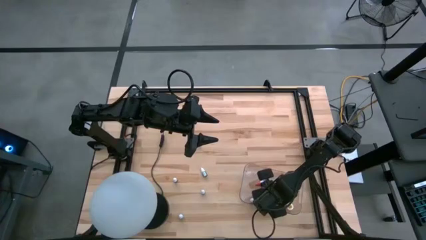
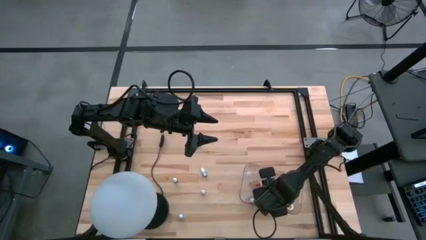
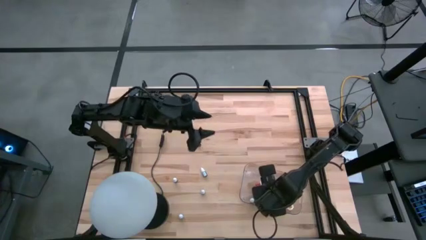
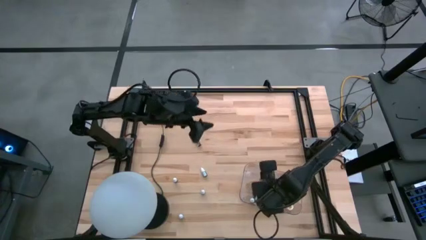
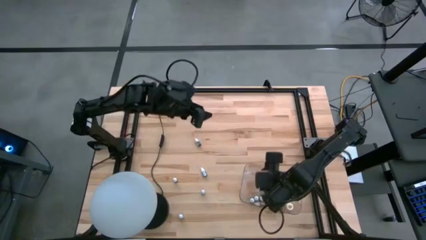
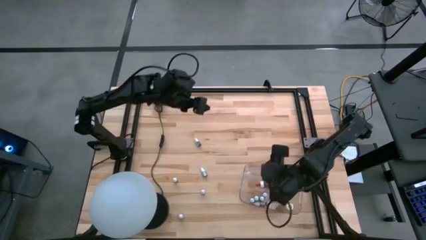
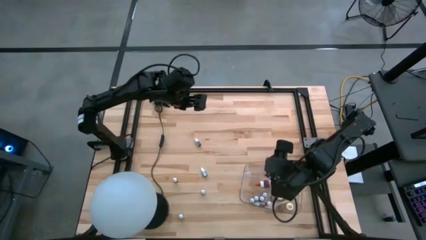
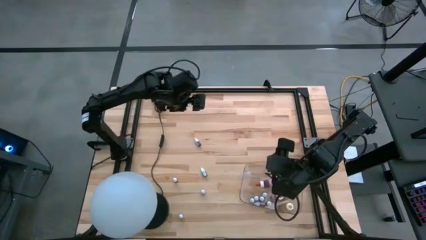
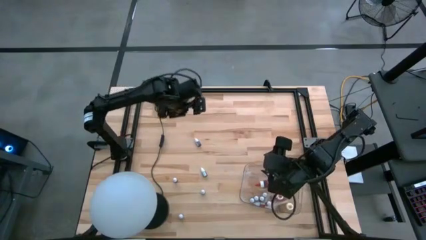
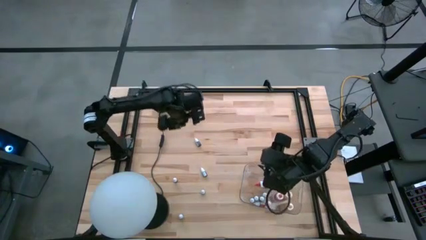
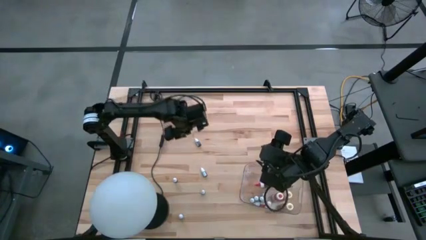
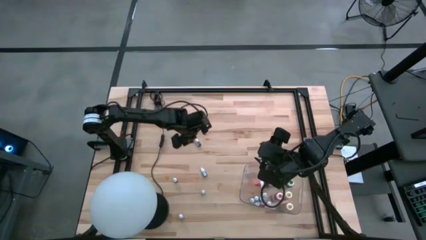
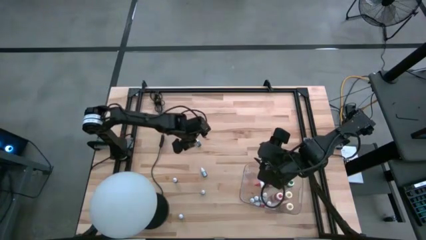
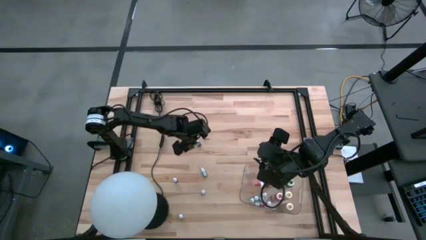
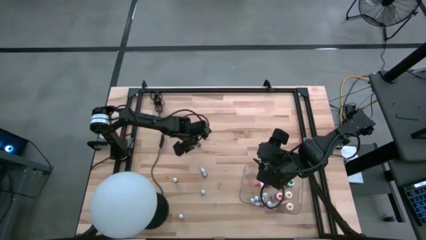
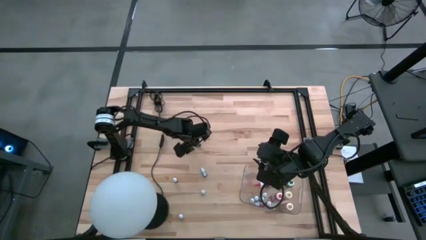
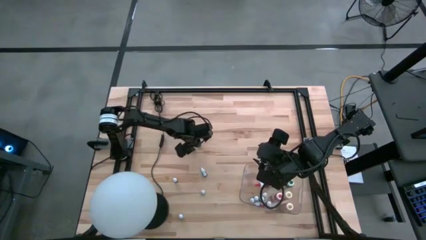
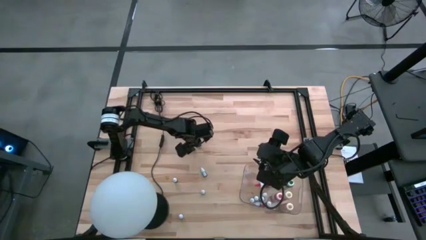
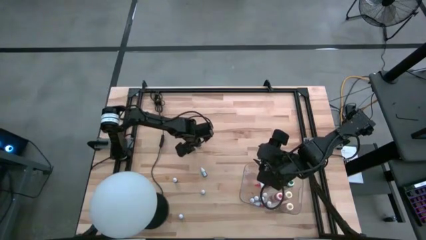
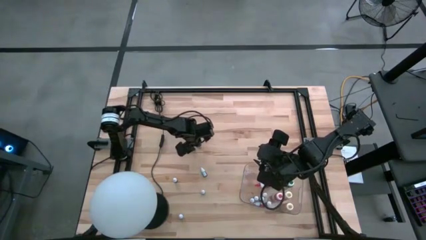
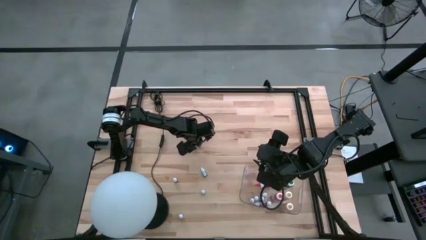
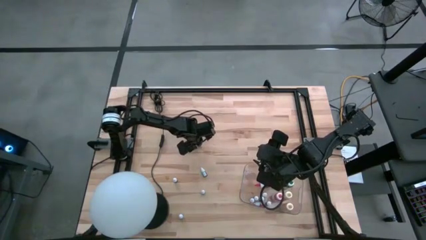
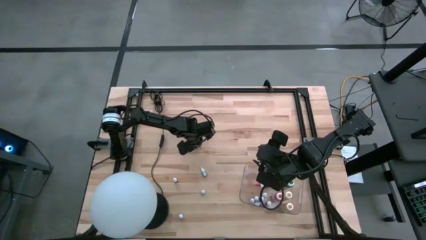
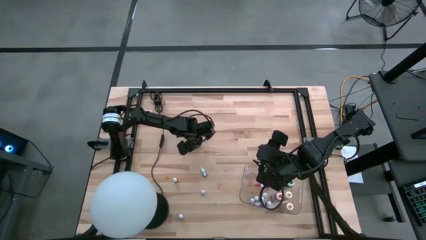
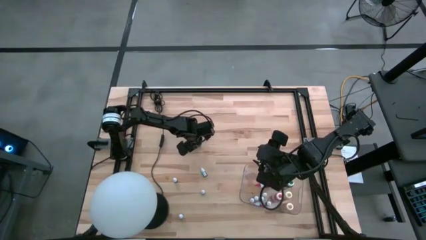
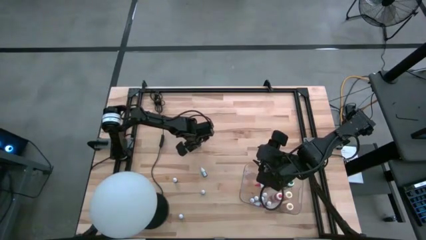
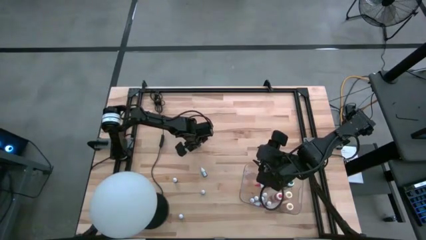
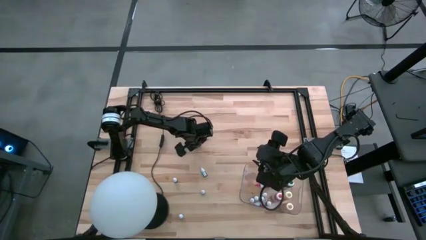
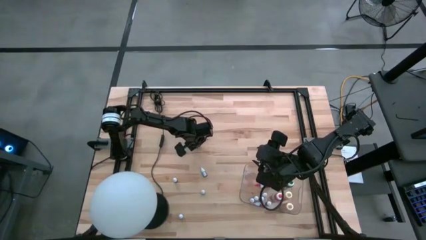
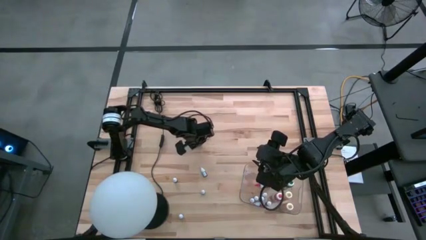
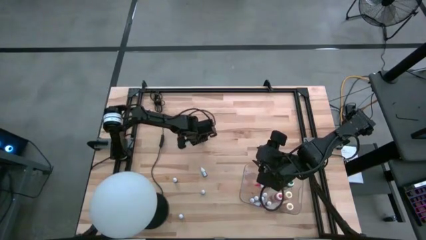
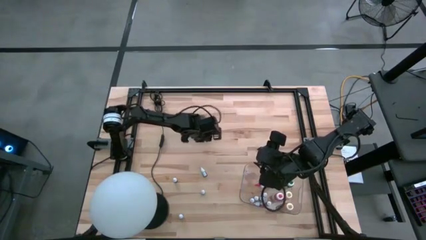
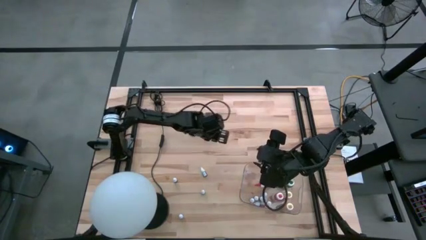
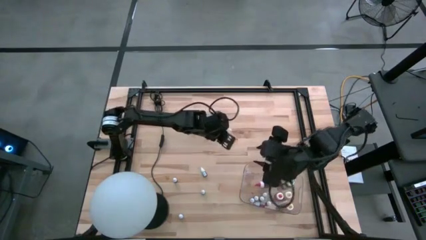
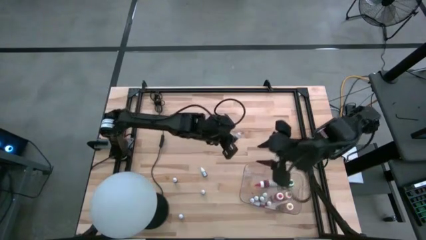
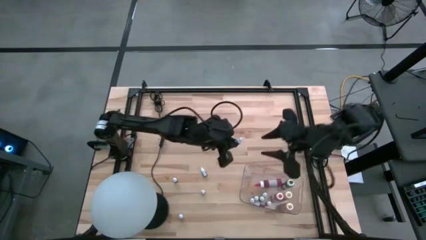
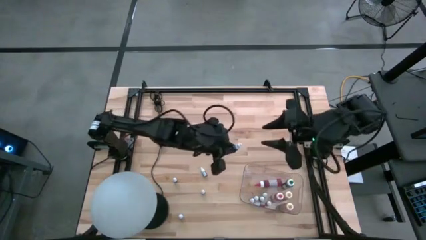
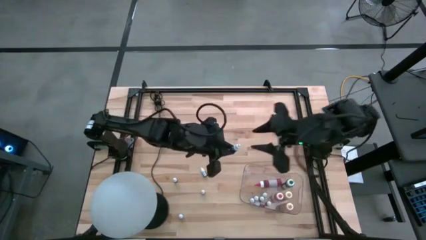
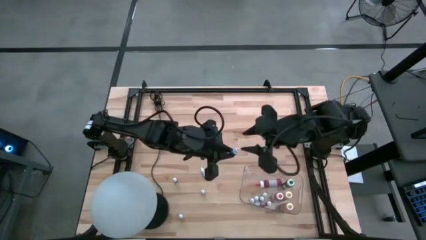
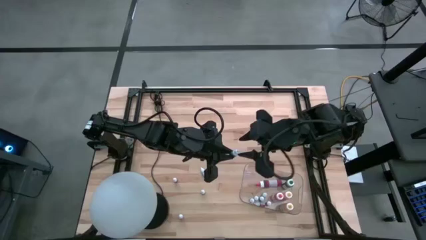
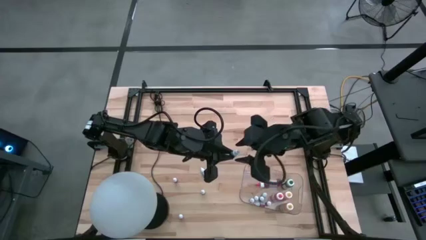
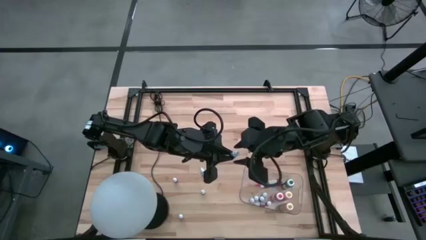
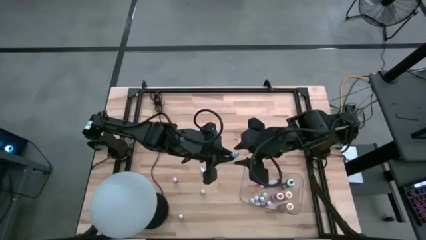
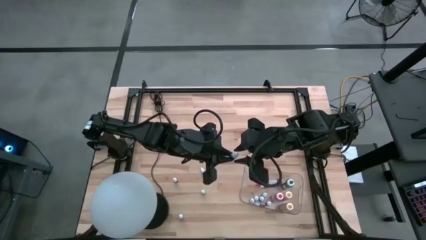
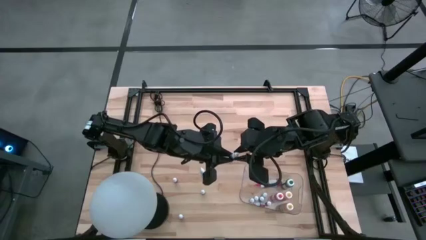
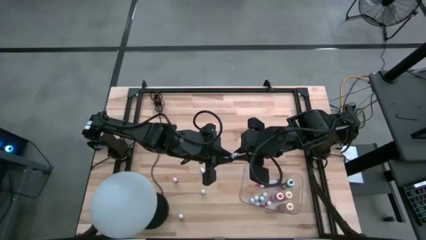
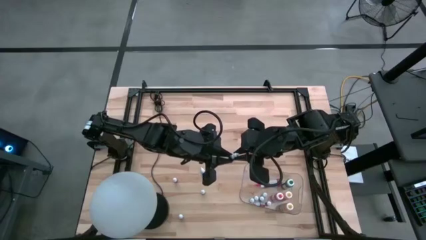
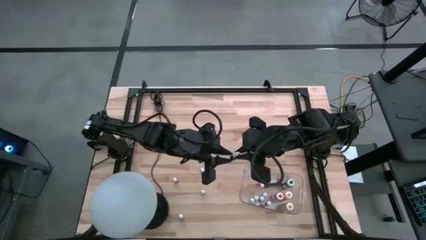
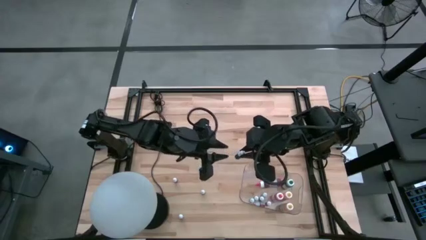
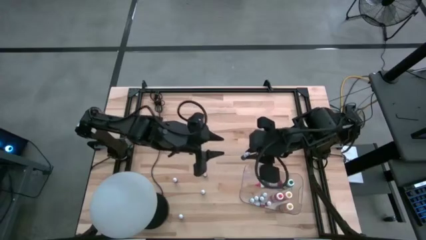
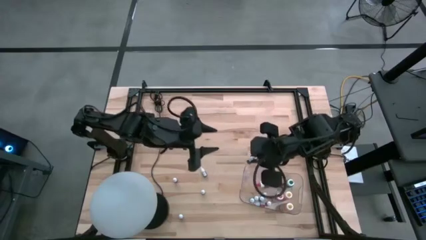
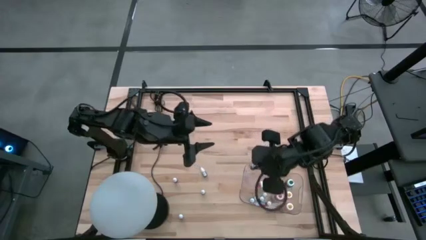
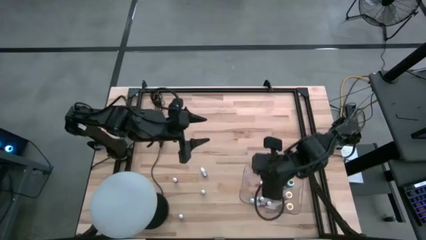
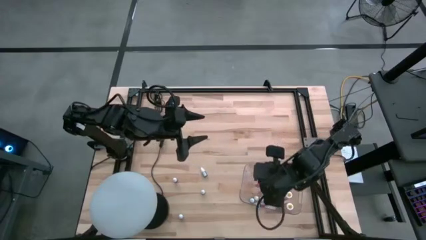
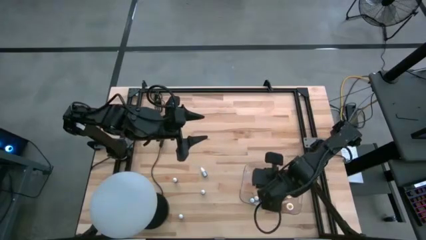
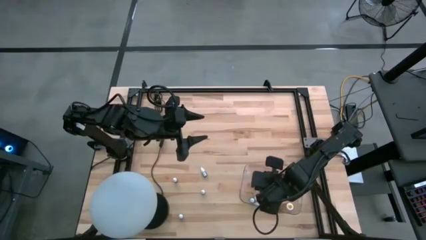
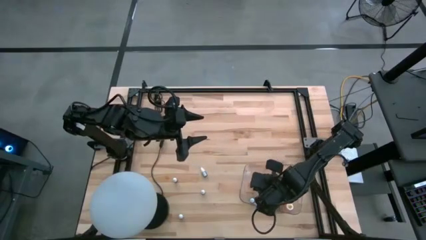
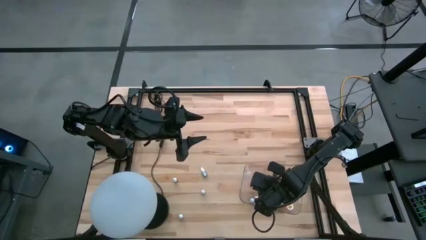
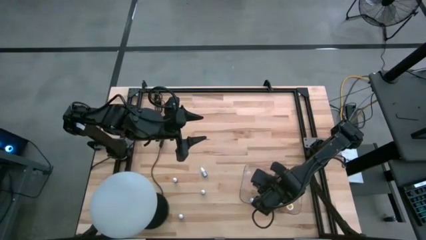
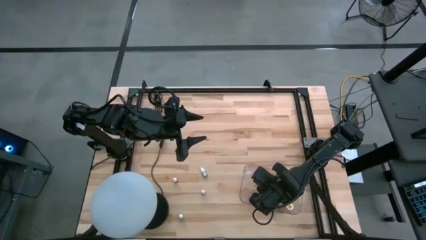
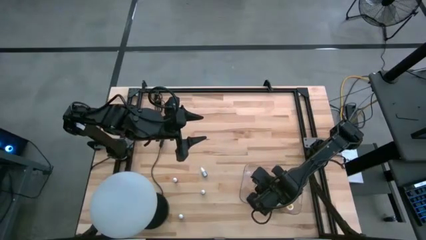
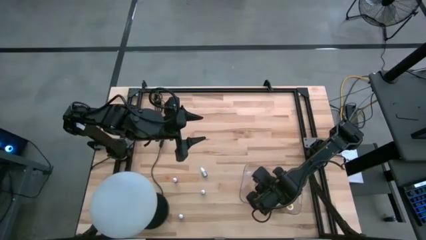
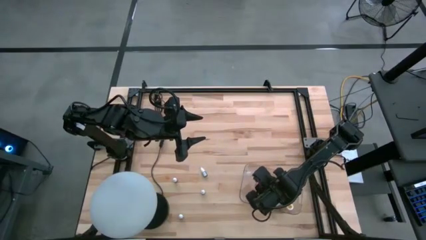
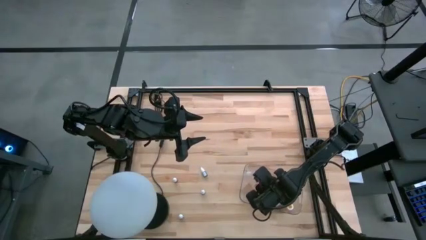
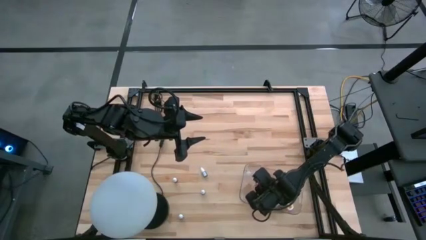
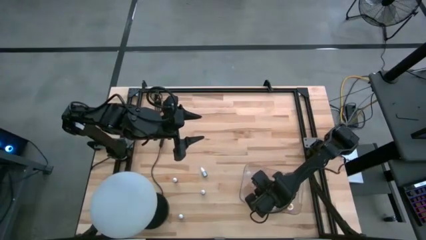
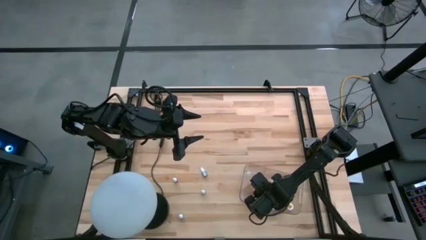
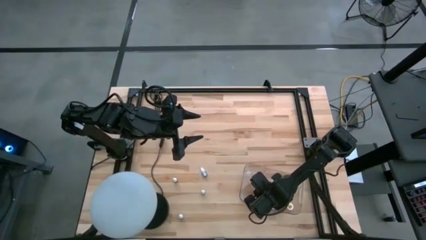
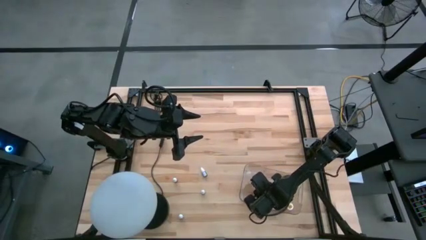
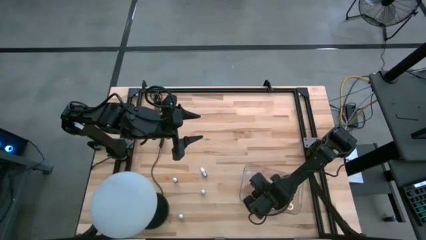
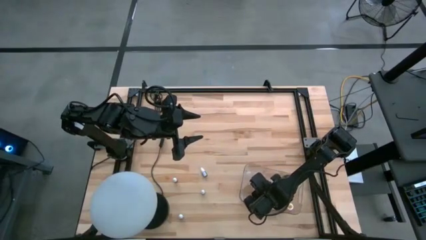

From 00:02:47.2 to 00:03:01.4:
Task: Pick & Place food coloring
Put the black food color into the transparent bin

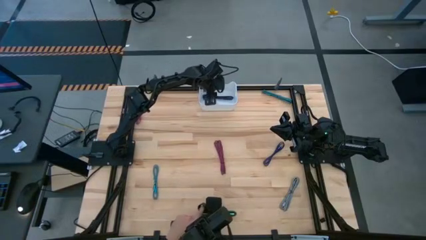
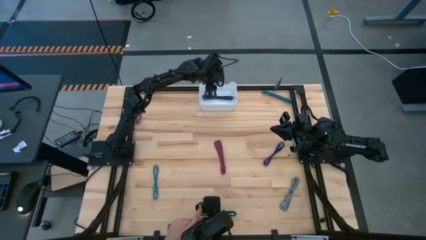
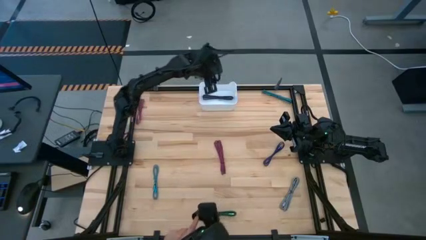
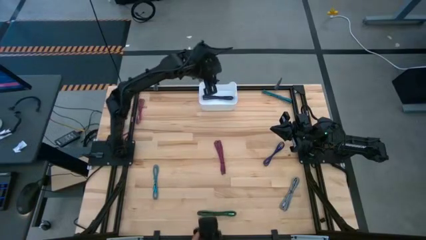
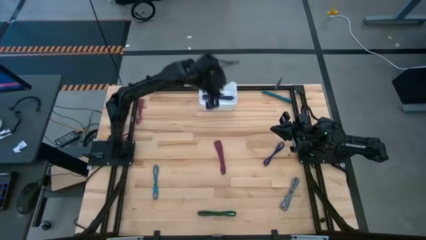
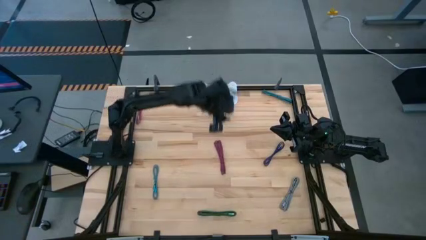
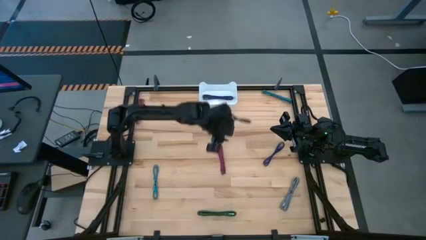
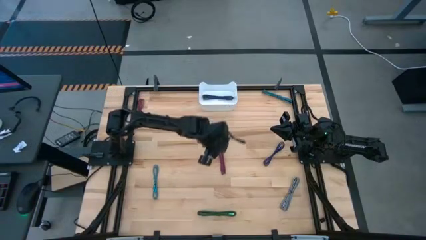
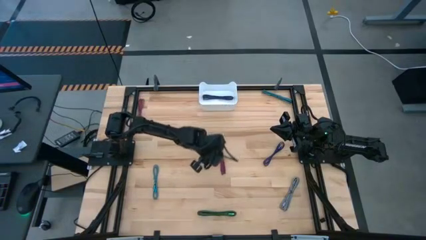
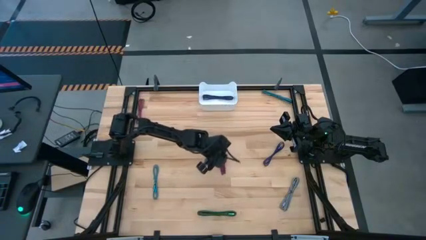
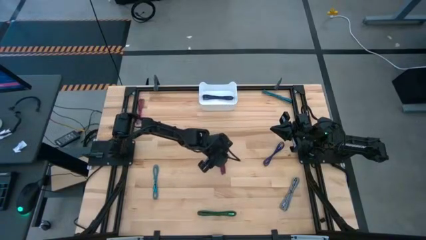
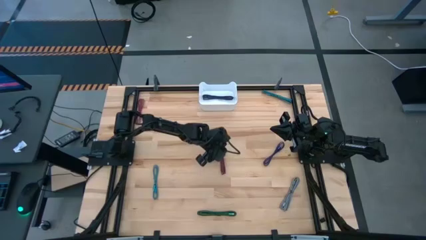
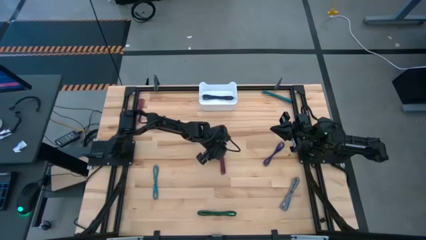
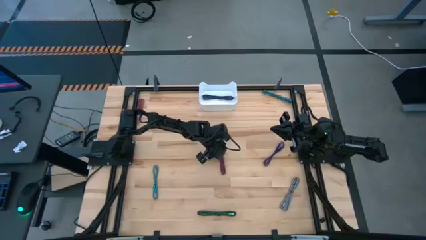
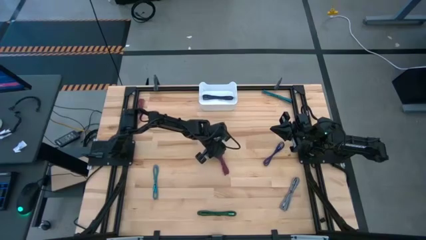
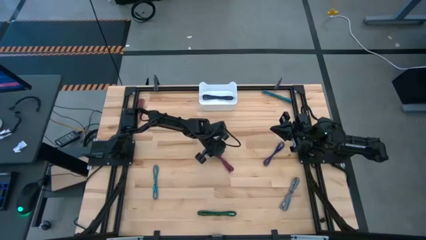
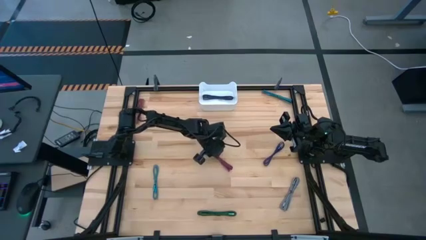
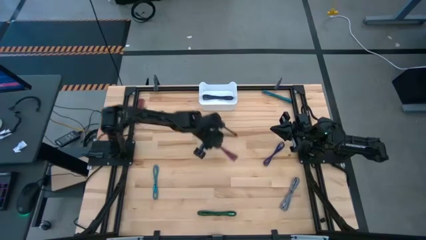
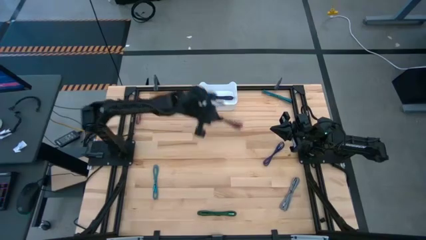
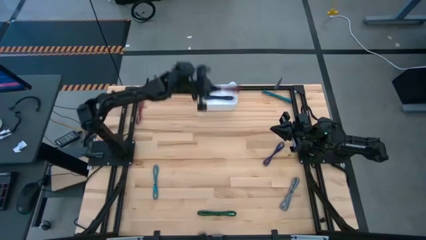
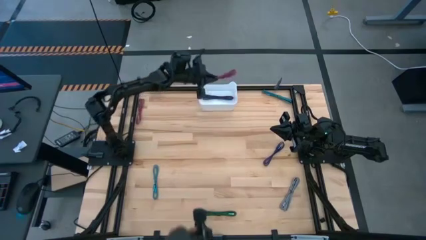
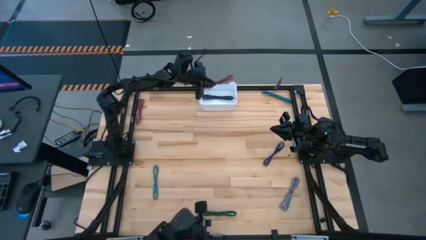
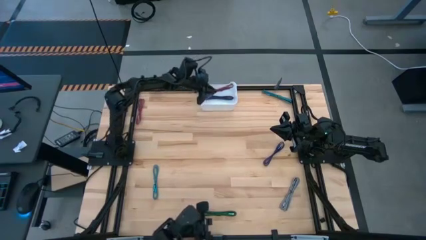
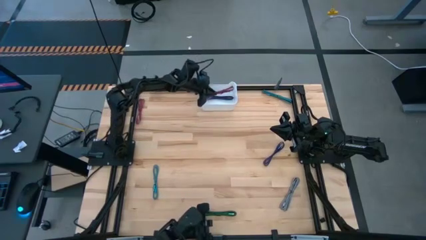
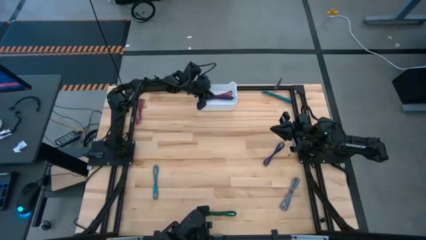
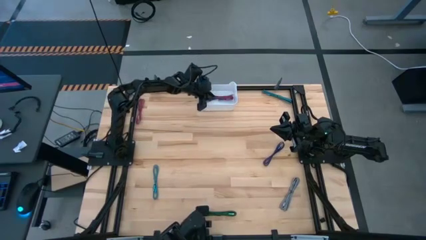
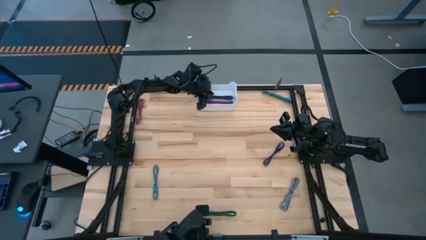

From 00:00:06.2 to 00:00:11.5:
Task: Pick and place USB-C Cables
Put the right red charger cable into the white bin
